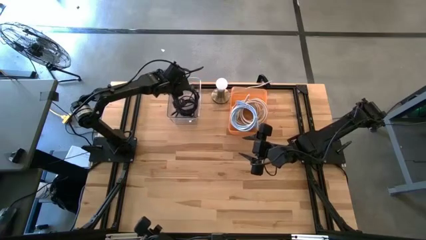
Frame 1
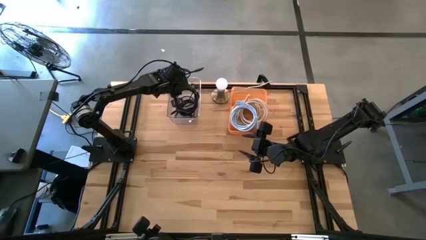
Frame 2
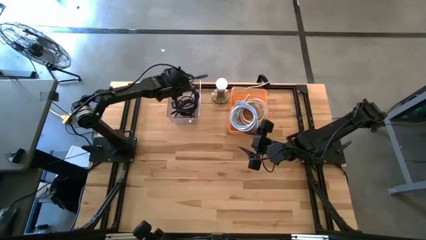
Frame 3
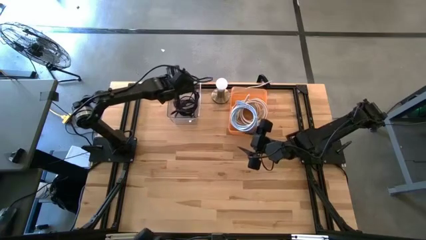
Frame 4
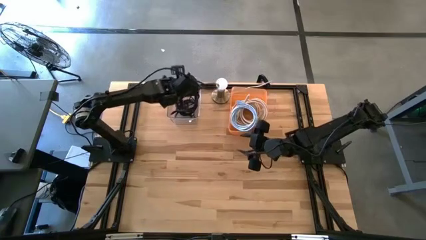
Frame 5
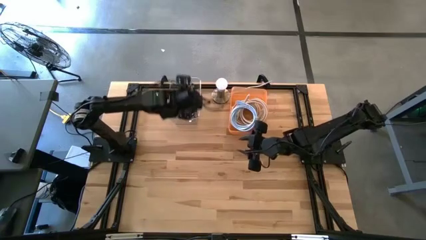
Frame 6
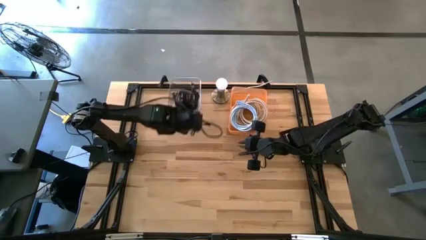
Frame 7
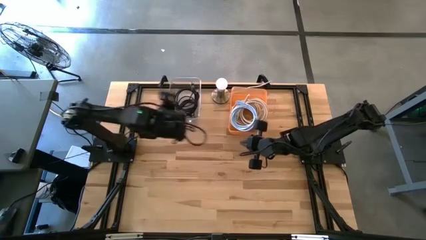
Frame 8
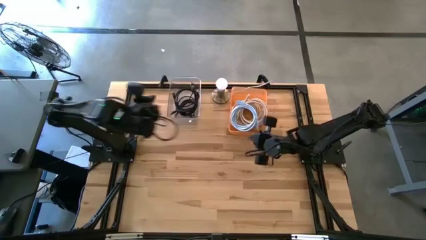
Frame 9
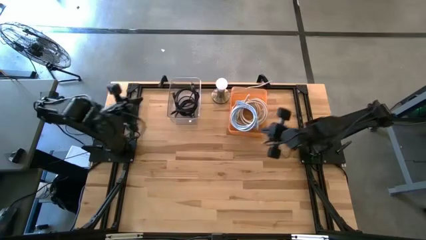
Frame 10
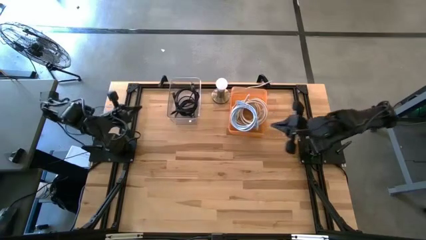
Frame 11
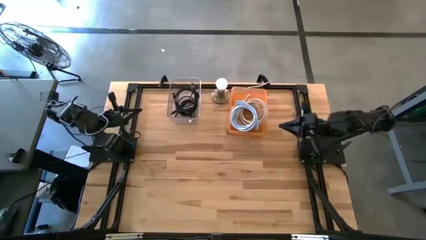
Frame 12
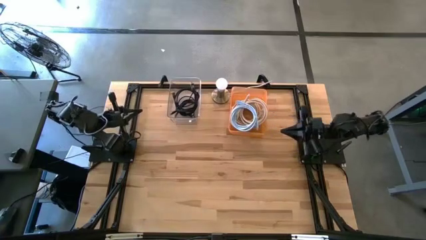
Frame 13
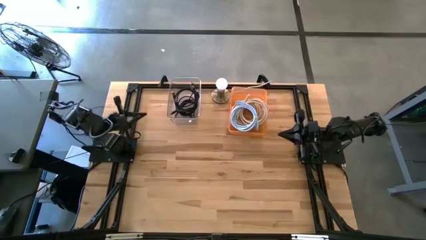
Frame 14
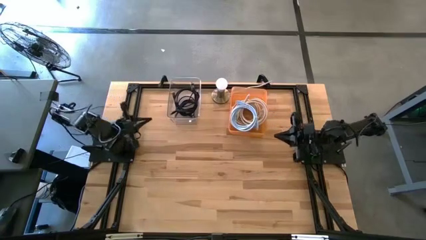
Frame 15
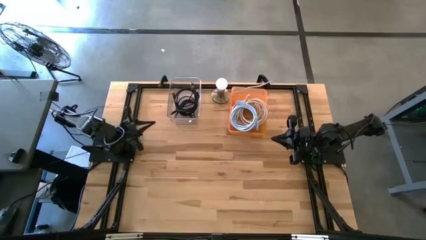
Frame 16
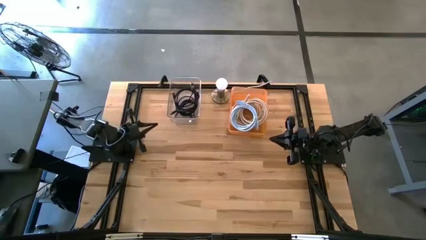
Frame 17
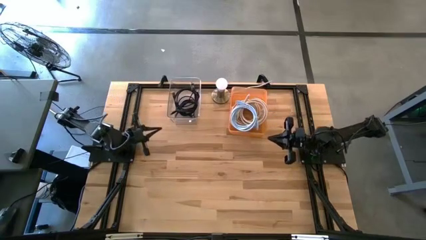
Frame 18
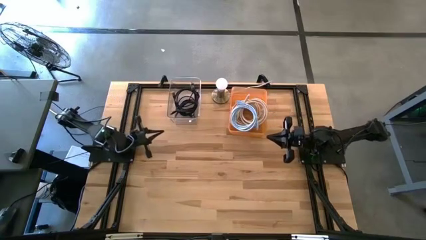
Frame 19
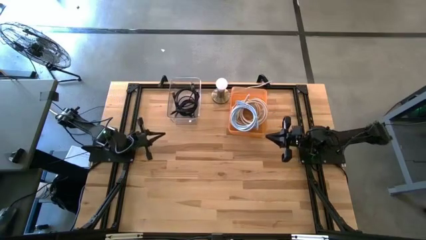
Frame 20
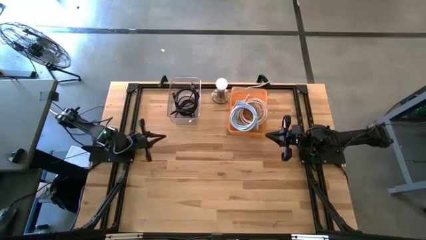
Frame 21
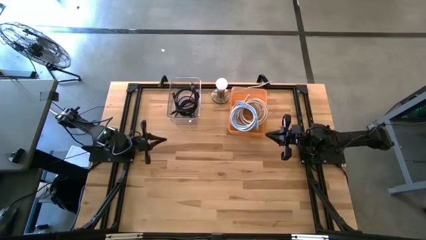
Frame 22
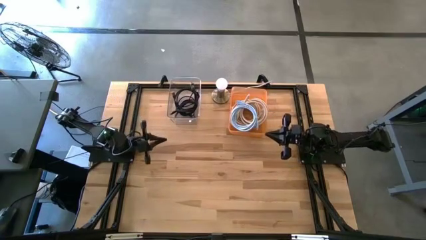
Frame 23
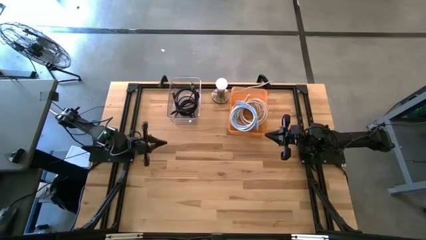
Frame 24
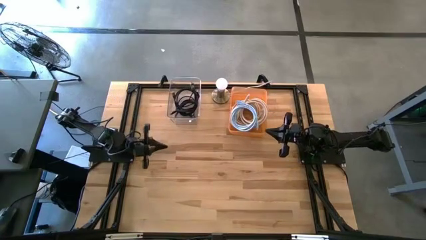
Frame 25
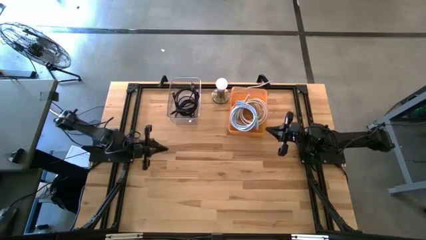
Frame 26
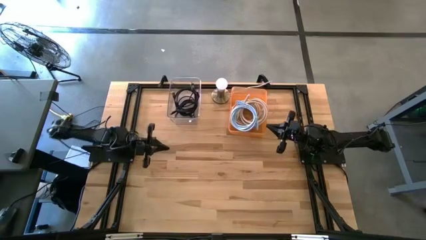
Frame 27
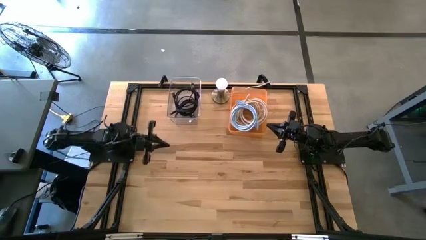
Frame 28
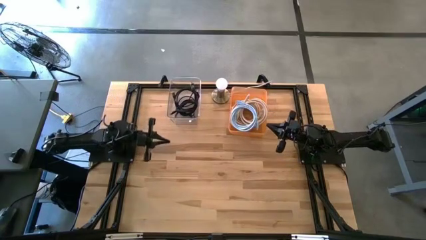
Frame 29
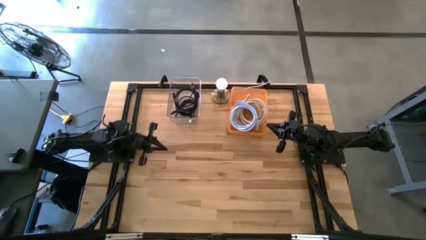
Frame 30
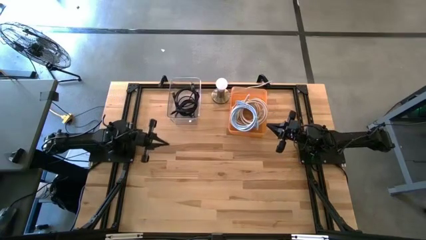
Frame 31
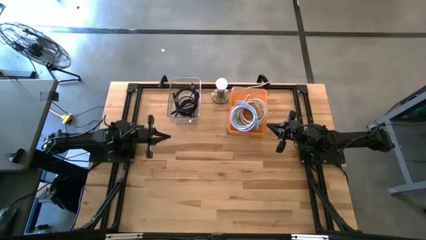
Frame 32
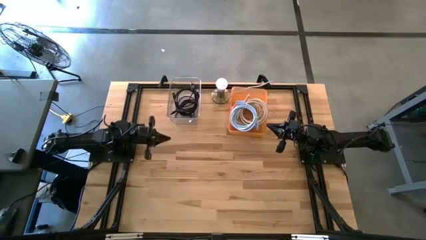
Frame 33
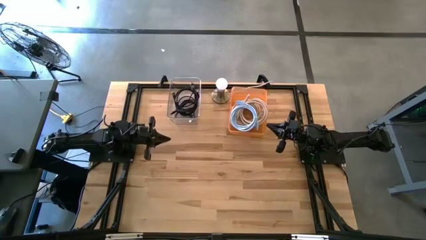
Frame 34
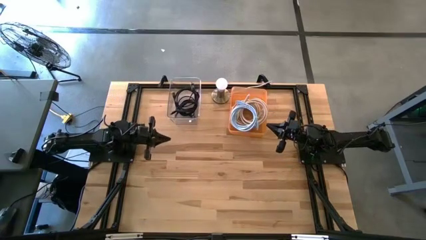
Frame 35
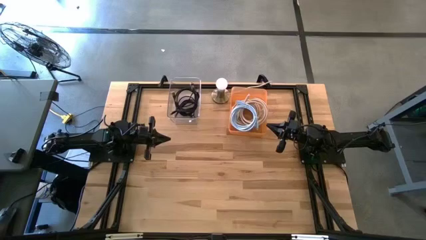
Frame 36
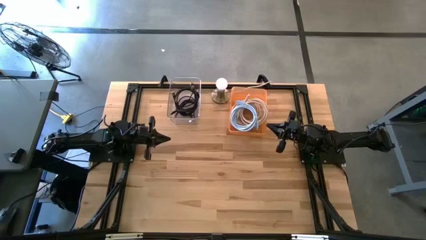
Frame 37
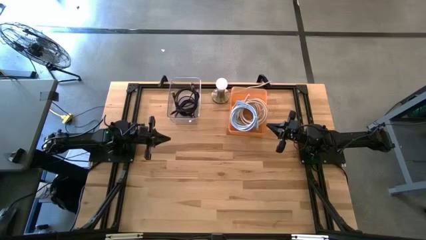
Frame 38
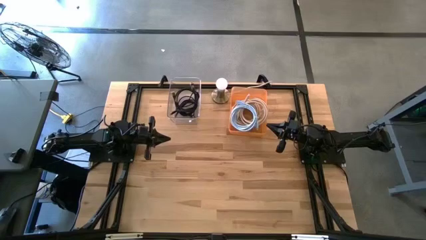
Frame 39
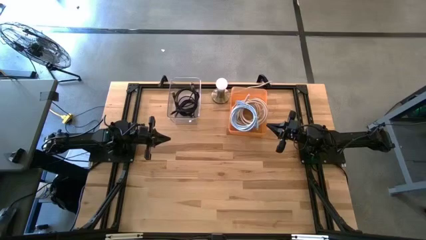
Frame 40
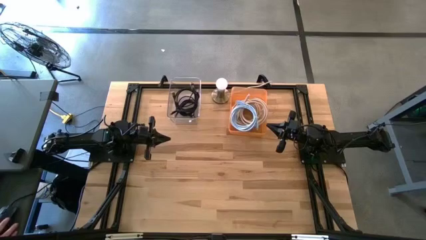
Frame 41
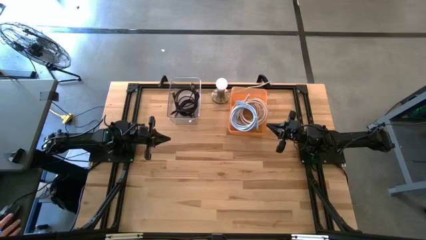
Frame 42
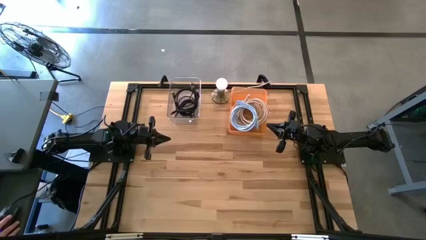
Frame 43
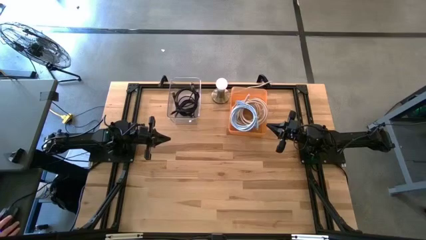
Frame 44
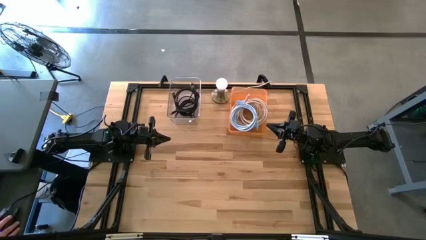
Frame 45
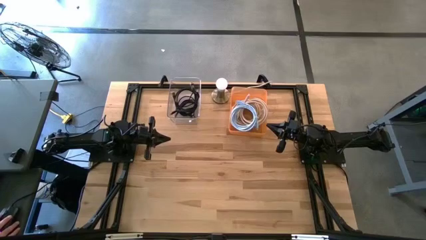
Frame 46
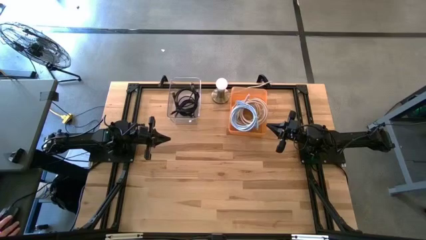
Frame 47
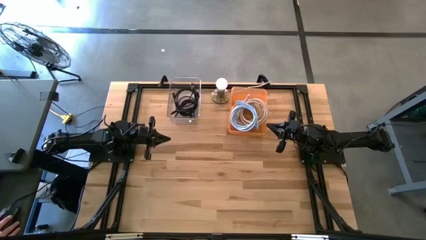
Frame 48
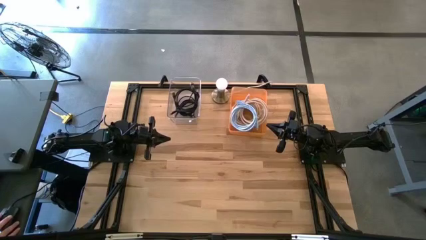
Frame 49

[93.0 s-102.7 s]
Task: Pick & Place USB Port
Return to Home Position

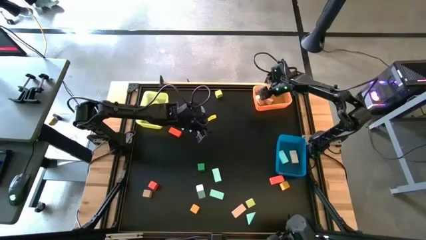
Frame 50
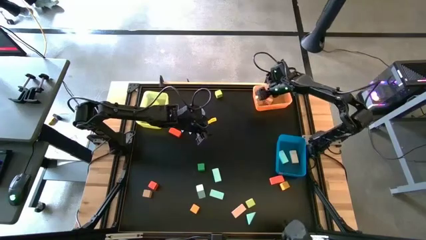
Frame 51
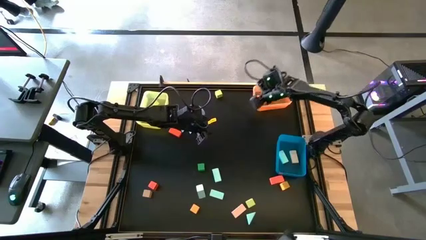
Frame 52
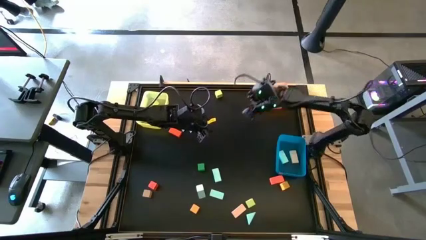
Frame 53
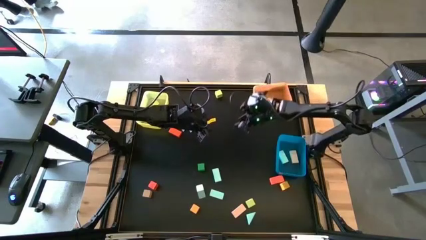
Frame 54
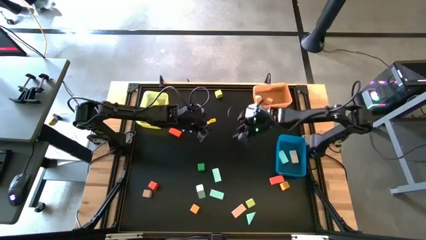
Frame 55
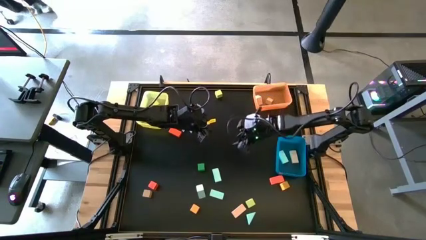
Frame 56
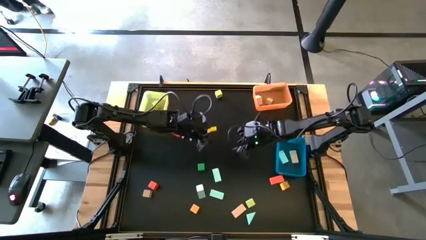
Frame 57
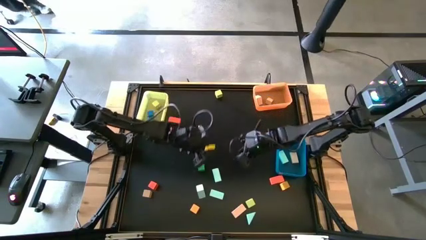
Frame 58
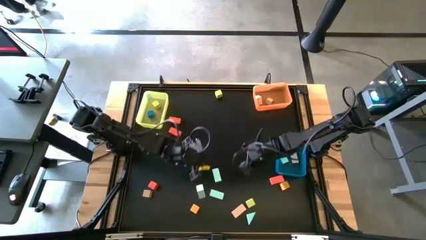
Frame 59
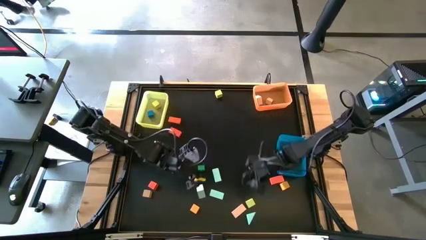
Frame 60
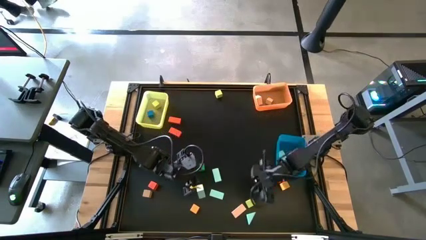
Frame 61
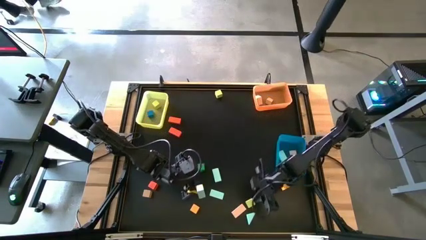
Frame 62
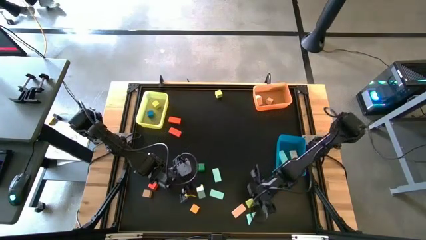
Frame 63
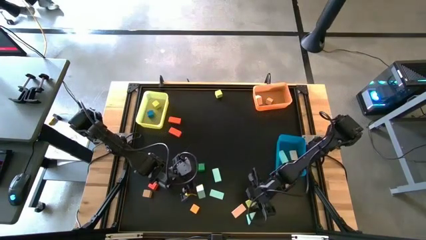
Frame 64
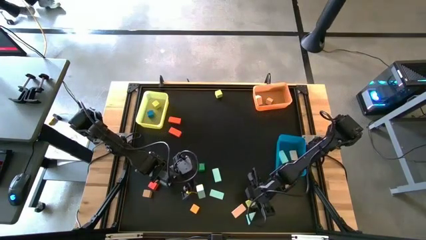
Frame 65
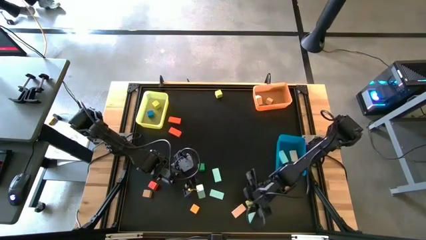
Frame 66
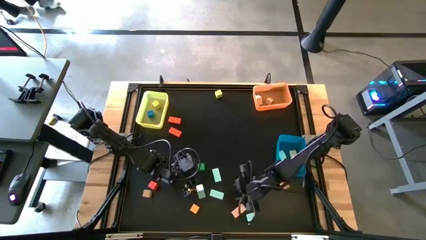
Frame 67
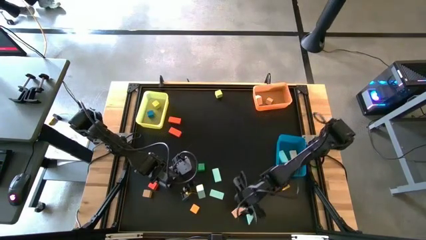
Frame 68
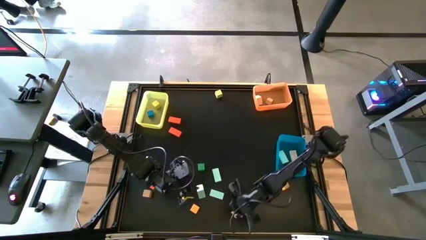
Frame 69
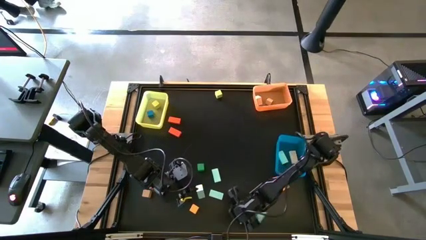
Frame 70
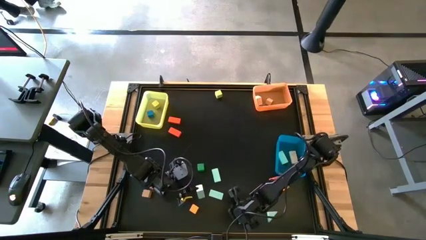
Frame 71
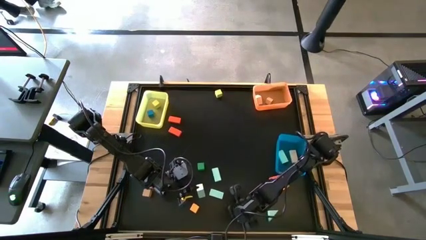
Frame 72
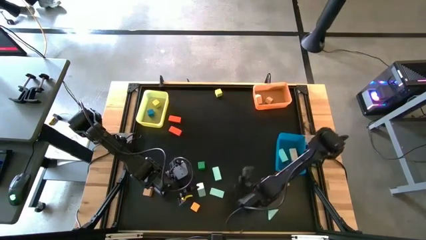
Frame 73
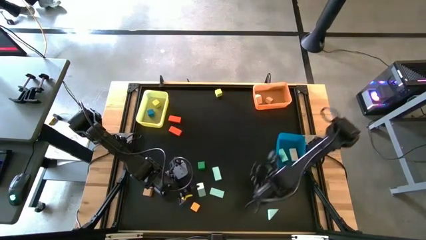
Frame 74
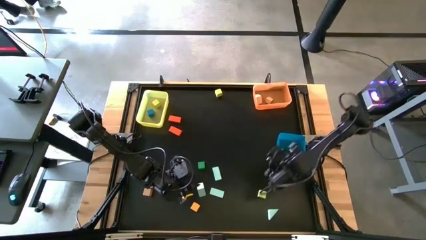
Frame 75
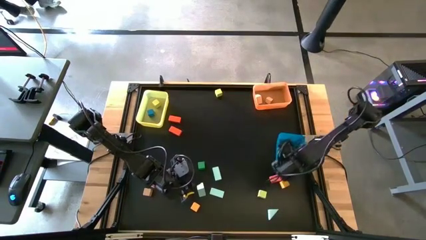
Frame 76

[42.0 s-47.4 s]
Task: Sort blocks by size
Put the pink rectangle block into the blue bin

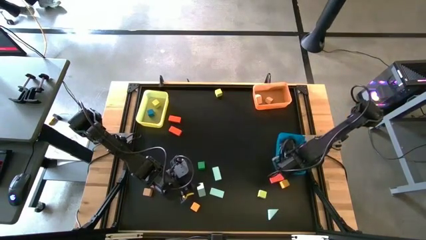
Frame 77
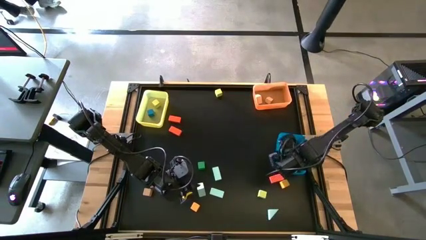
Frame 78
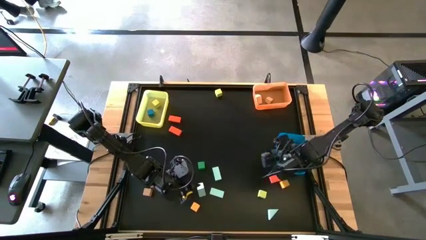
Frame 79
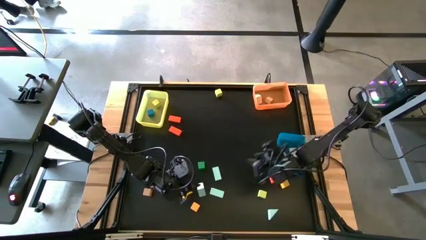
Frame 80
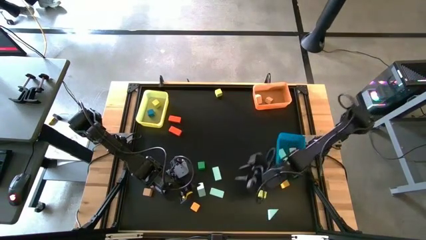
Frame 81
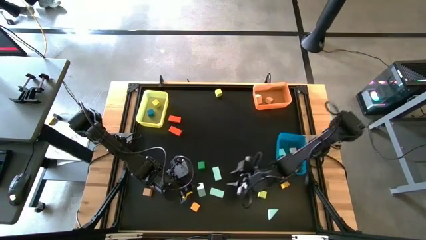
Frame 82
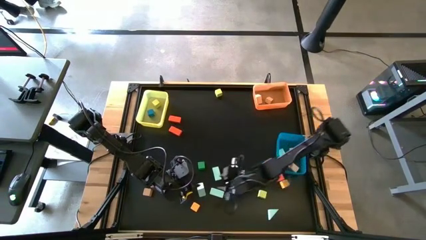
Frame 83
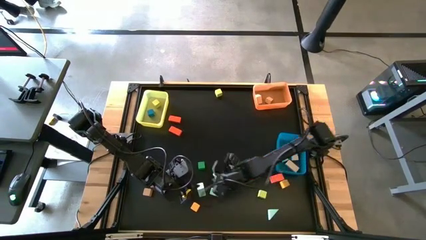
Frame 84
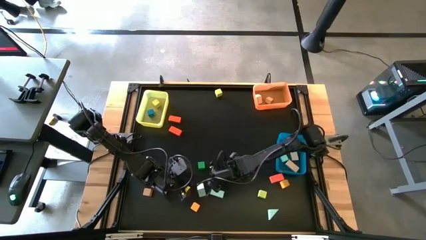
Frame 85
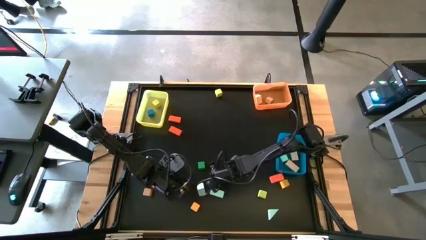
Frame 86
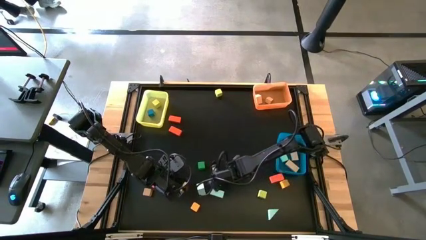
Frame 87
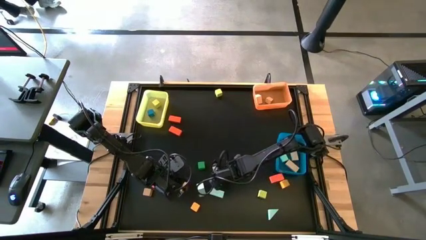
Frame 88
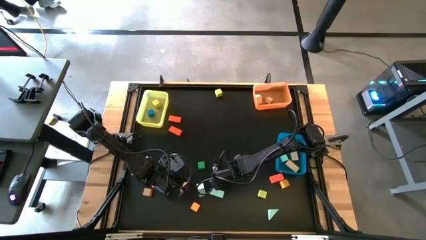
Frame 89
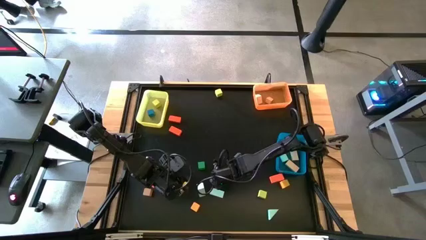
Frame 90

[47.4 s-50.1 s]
Adjust the blue rectangle block
